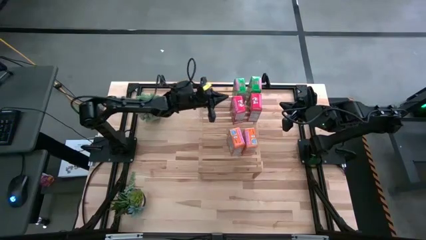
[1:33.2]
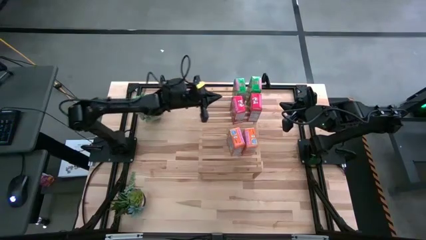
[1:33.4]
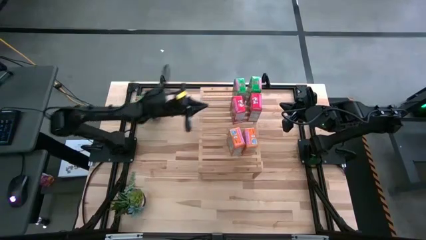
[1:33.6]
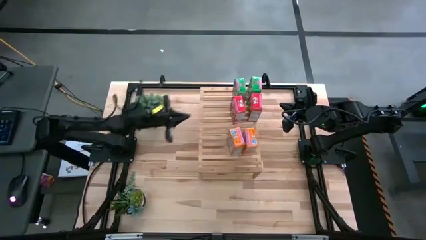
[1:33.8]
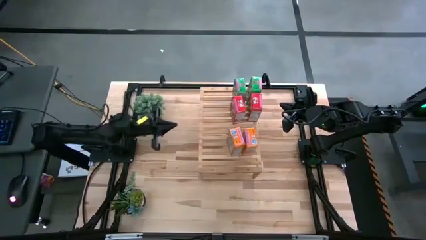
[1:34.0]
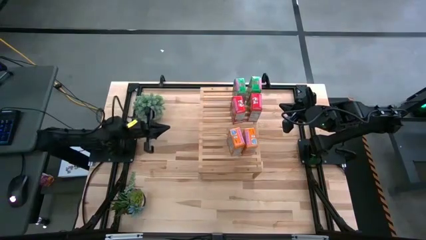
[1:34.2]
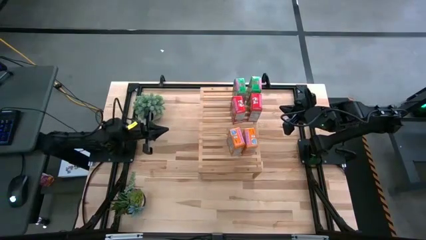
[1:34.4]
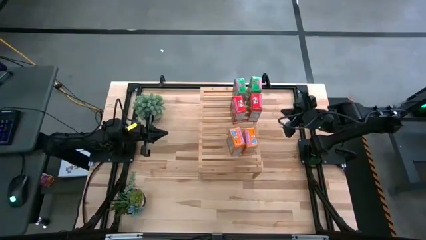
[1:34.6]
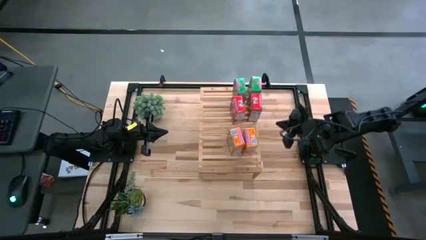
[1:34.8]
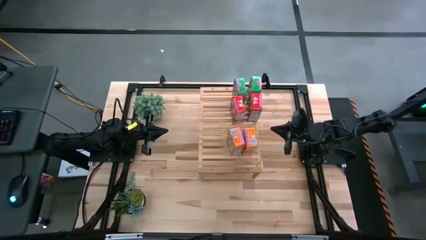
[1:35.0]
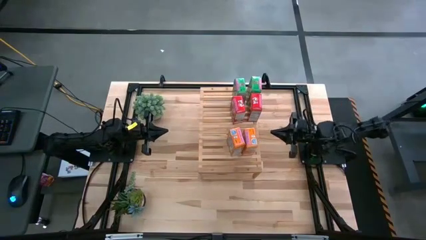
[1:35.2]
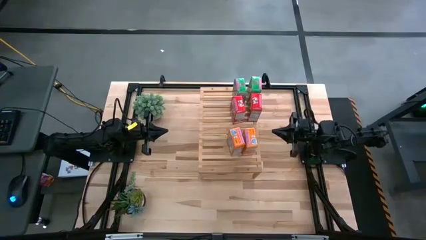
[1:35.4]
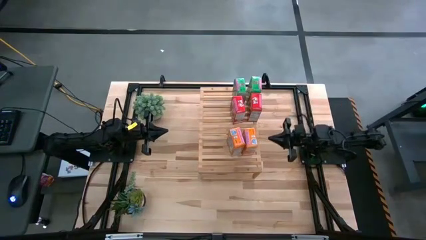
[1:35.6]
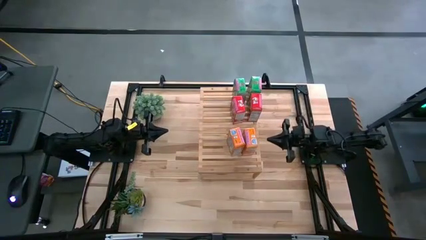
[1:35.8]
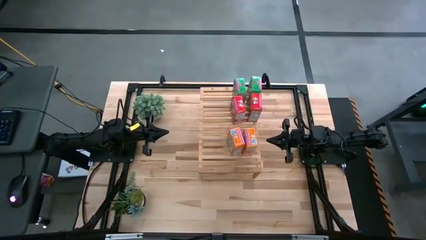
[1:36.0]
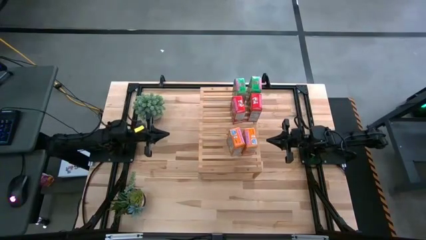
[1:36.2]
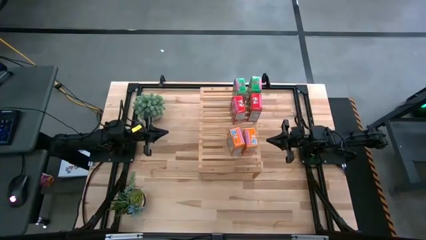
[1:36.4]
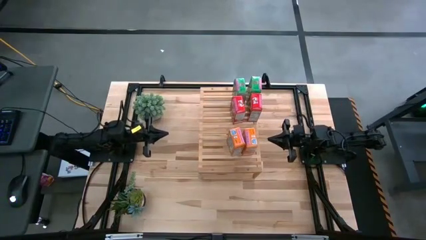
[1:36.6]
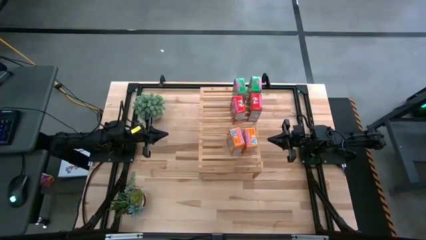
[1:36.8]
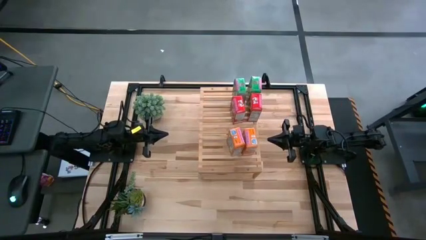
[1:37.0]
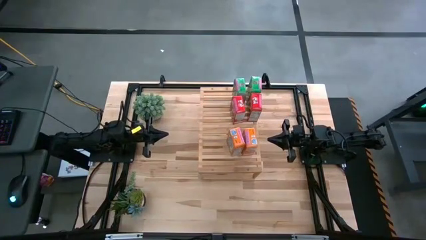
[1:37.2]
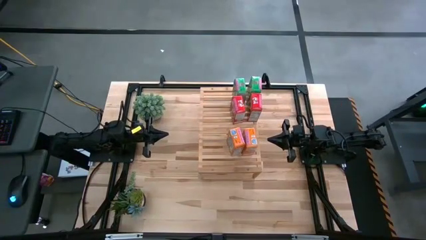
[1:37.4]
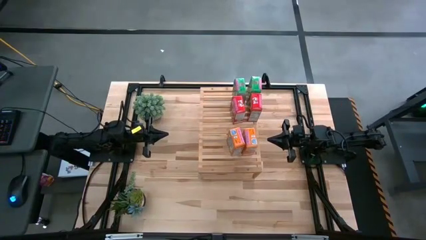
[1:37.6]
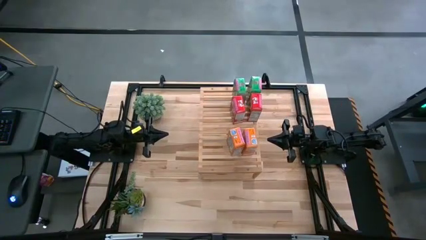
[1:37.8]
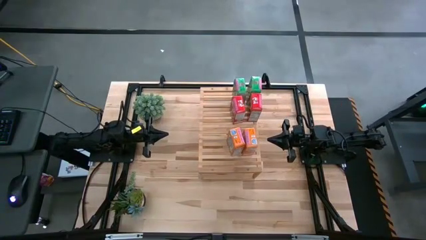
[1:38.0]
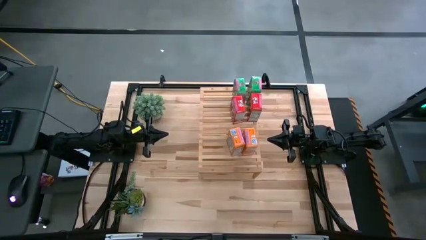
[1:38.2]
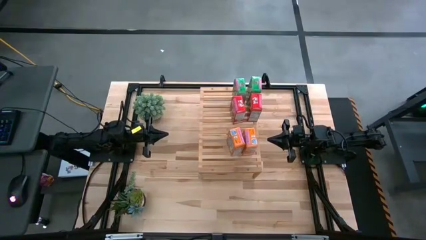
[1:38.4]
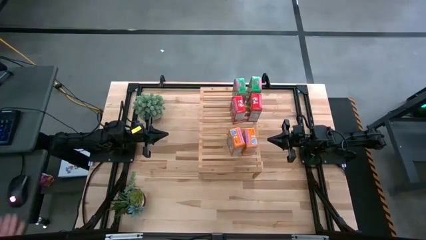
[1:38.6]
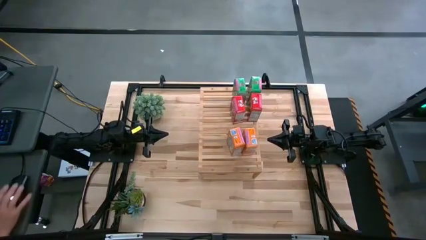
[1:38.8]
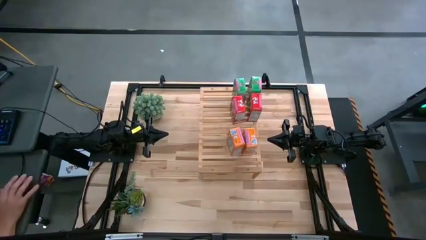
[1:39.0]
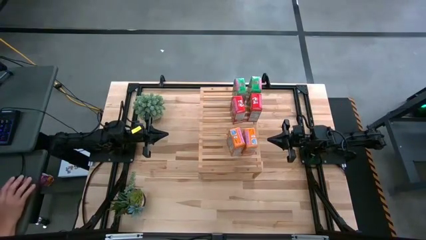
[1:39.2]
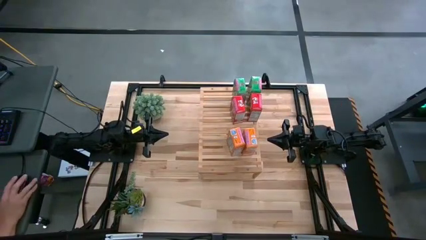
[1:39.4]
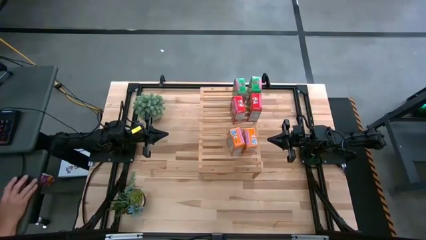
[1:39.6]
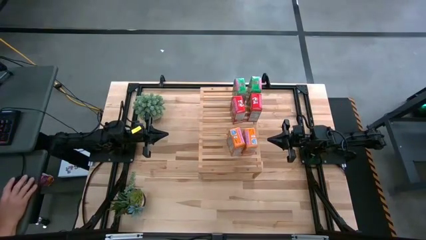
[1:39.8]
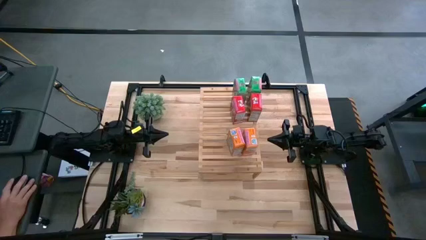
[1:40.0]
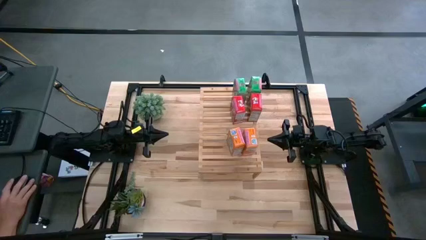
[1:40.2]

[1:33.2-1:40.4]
Task: Stack cereal on shelf
Return to Home Position

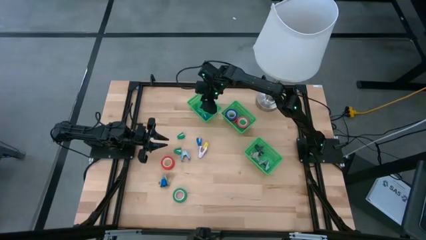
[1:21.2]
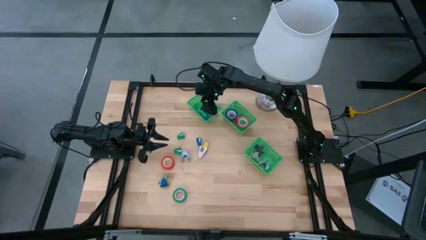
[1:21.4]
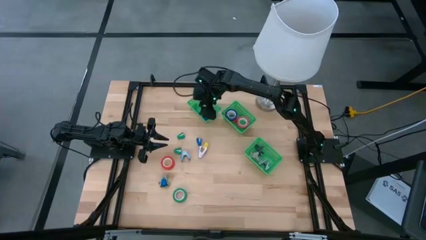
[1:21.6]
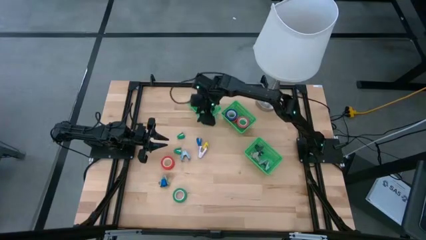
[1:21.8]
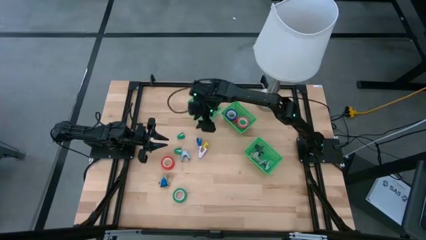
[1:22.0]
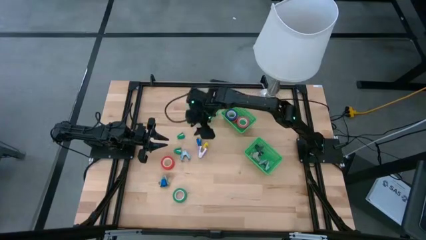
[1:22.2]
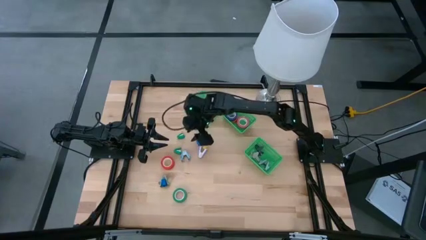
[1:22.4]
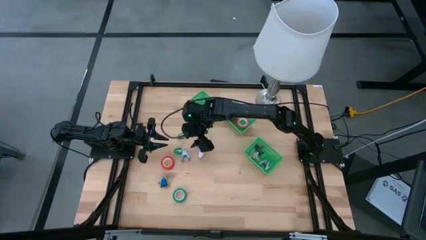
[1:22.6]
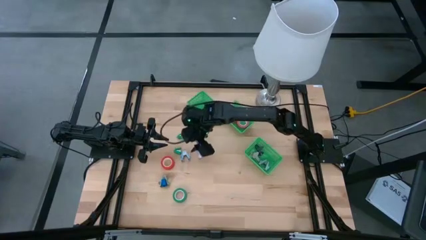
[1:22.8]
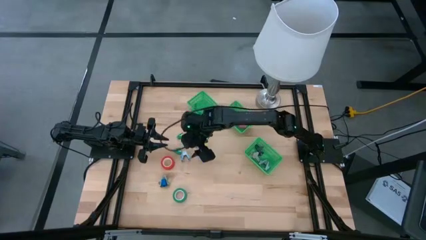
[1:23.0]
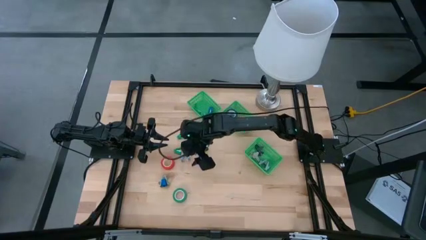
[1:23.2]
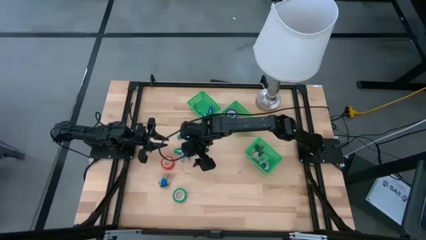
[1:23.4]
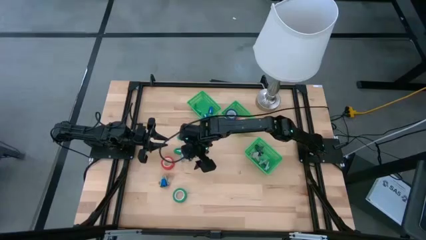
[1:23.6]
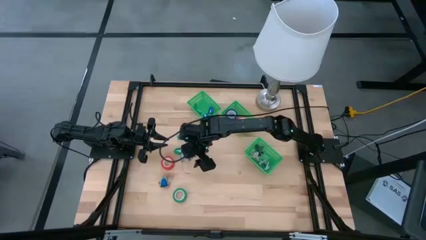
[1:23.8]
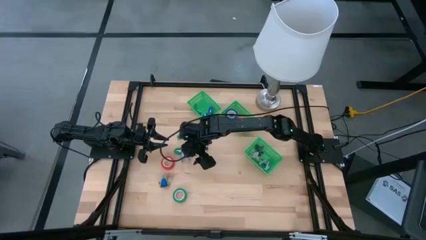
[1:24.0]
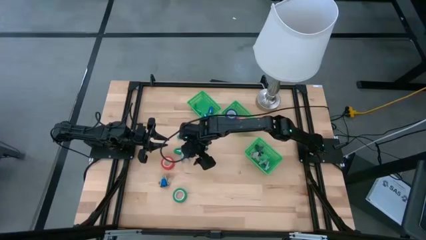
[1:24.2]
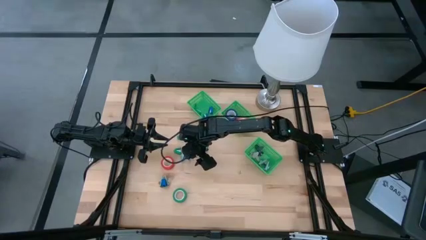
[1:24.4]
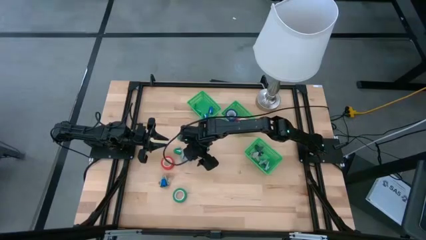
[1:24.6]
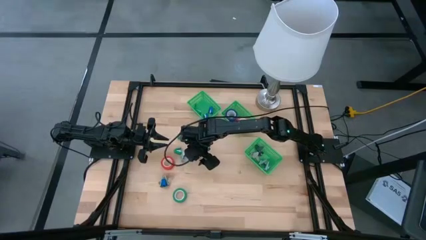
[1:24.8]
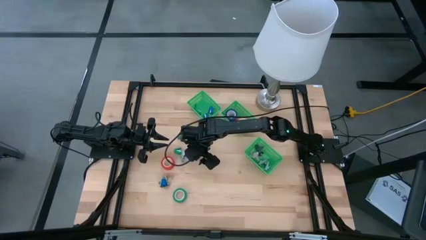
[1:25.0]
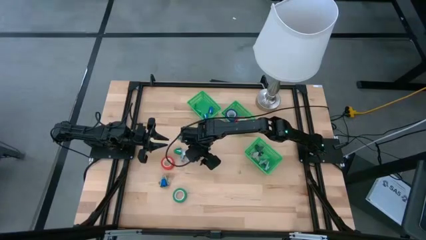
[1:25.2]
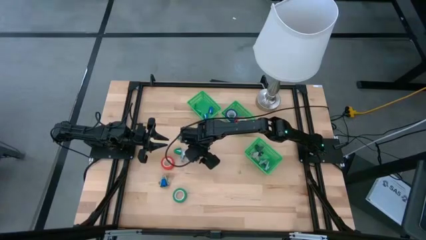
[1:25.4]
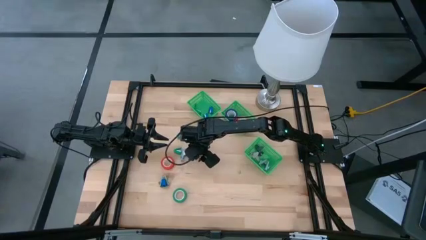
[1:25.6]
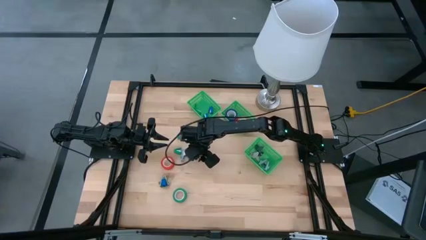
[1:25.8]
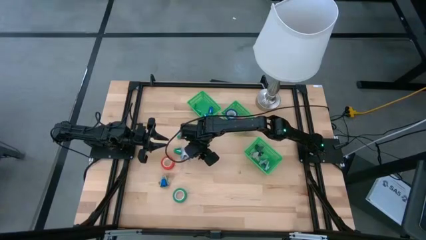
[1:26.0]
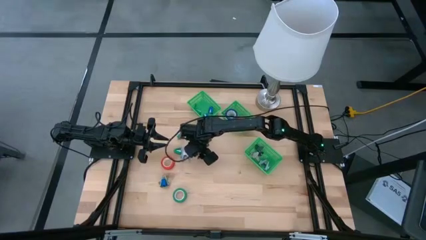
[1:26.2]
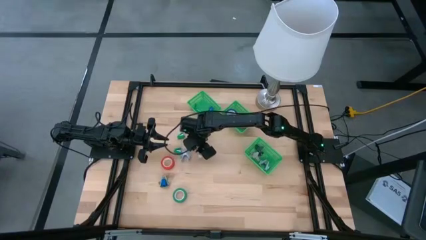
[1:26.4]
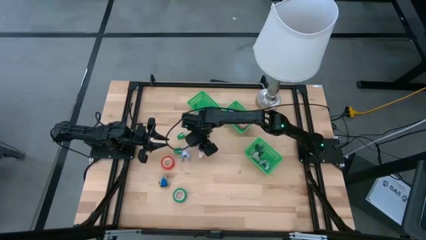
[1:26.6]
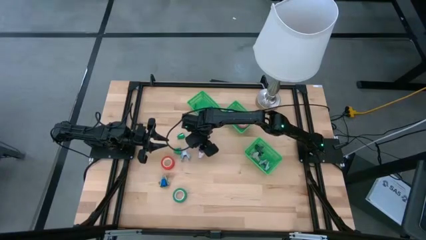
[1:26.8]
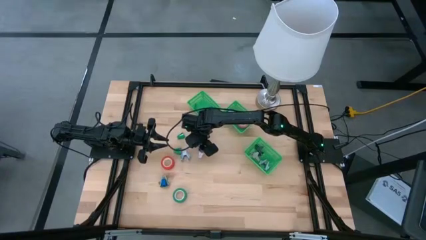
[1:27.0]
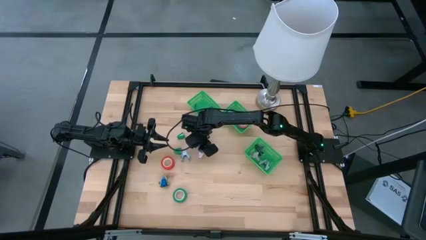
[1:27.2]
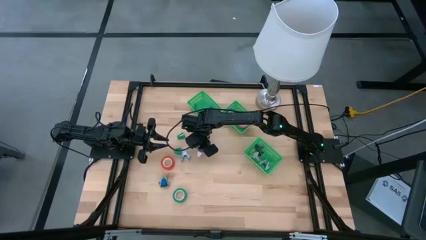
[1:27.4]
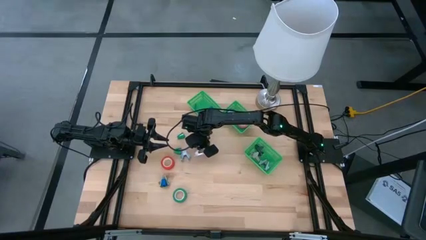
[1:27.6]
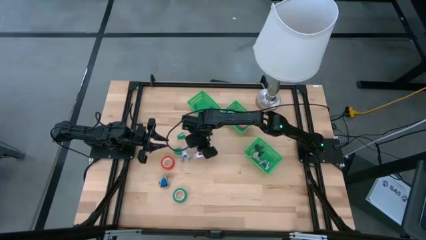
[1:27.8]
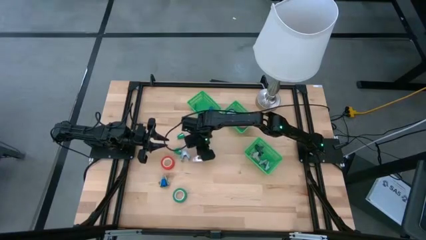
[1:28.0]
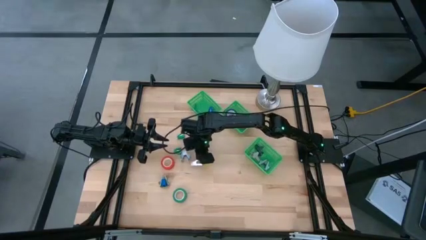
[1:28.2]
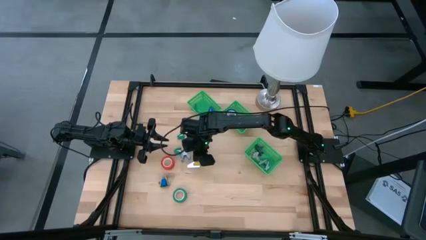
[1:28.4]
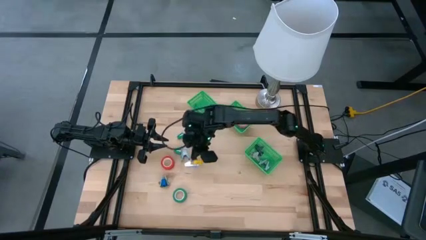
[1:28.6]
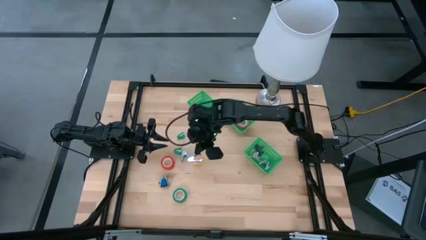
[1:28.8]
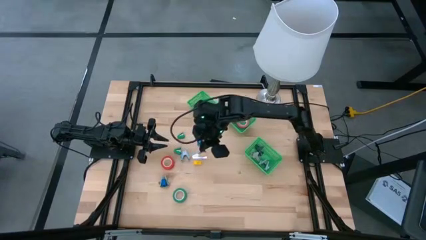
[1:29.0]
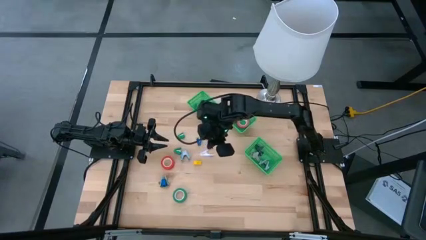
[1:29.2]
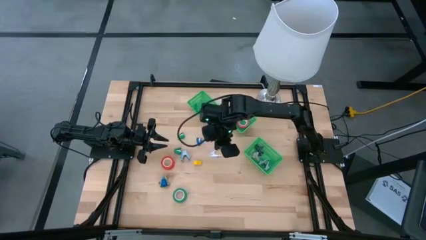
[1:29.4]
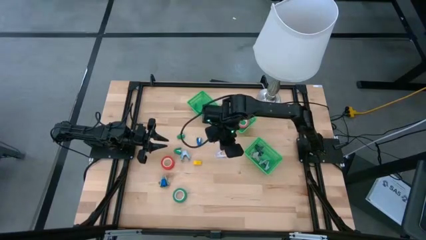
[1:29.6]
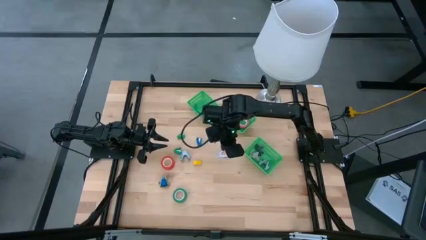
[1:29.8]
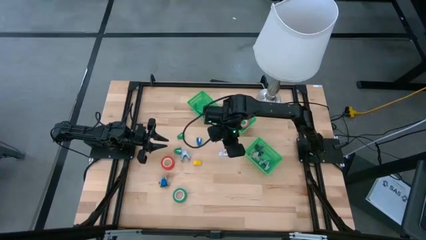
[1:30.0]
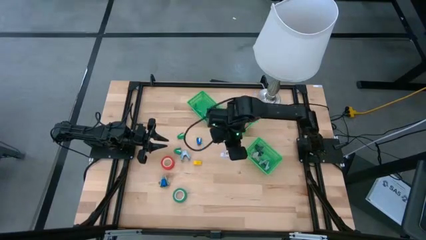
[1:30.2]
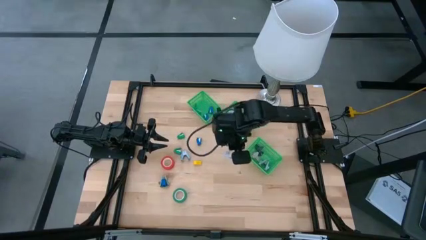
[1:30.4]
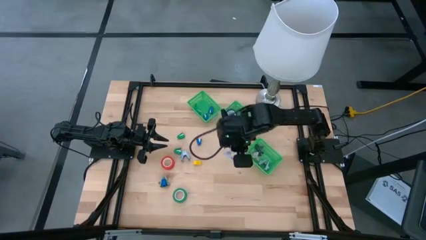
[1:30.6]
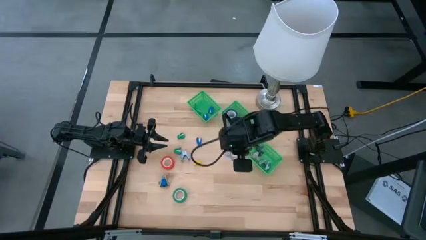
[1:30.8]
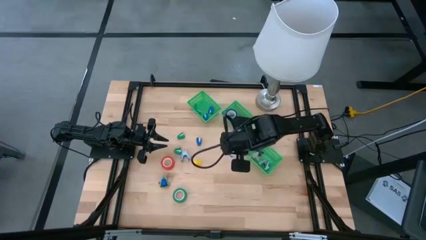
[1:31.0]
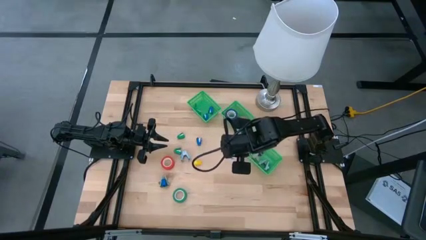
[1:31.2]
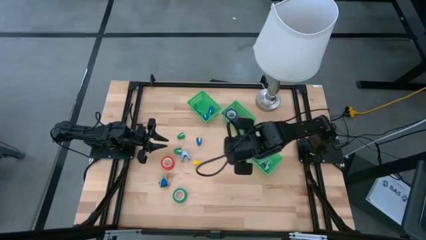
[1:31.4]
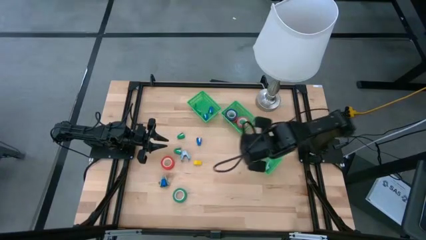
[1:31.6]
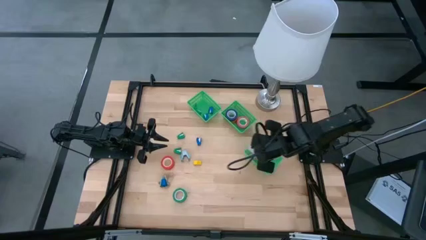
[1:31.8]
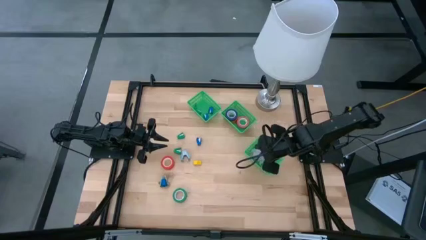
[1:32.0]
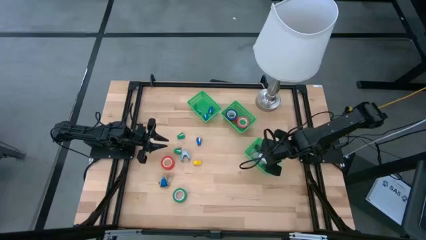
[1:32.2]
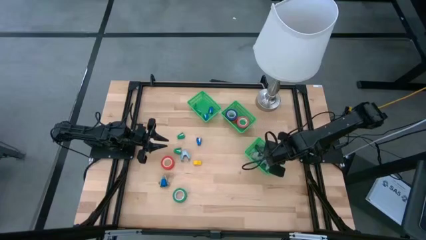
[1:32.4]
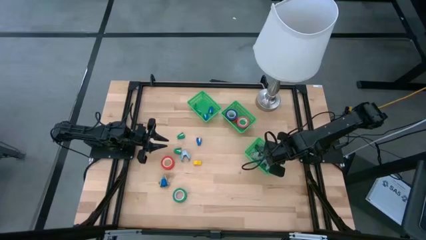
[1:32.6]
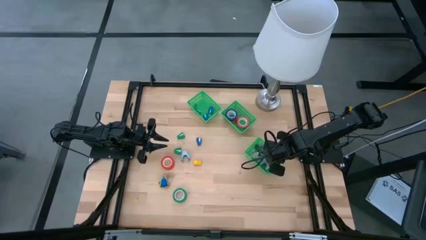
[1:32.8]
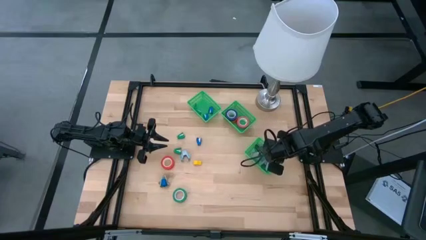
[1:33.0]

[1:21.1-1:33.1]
Task: Pick and place Stapler, Stapler remover, tape
Put the purple staple remover into the bottom basket
